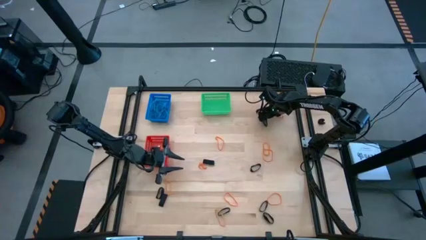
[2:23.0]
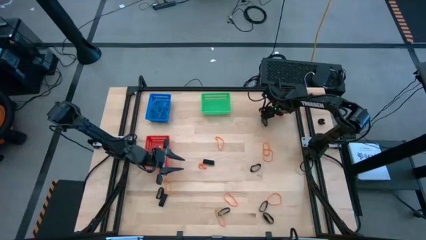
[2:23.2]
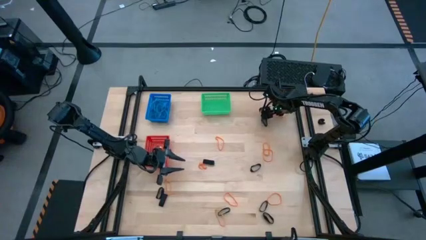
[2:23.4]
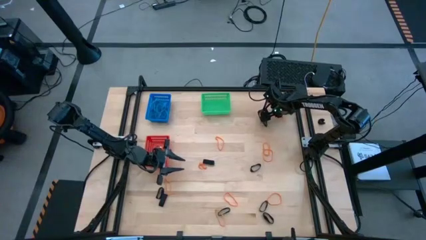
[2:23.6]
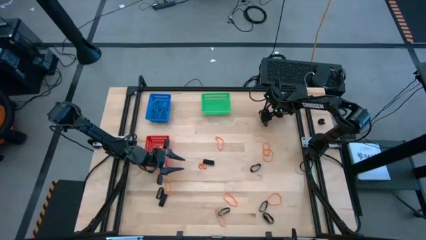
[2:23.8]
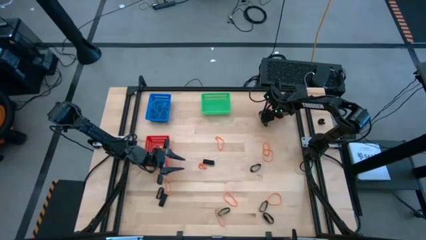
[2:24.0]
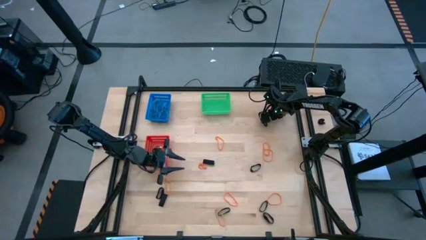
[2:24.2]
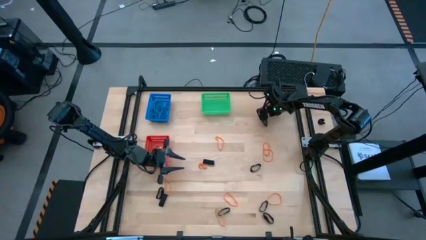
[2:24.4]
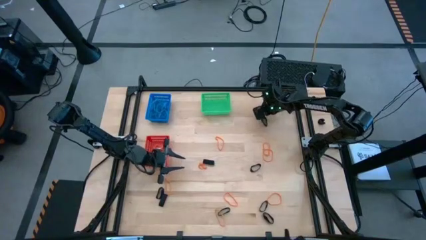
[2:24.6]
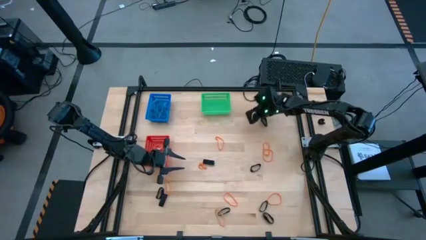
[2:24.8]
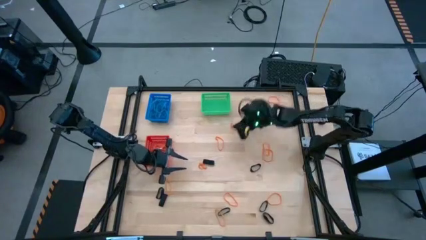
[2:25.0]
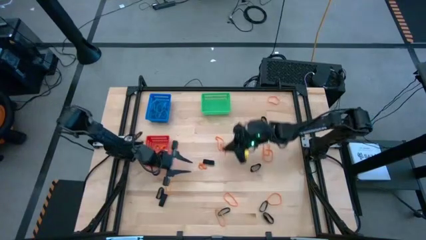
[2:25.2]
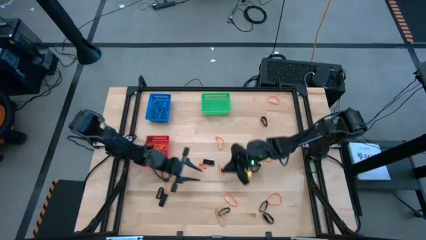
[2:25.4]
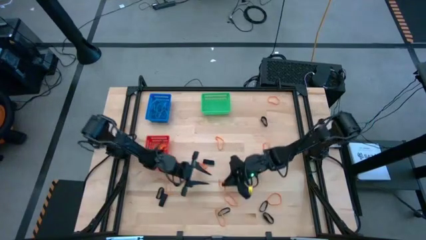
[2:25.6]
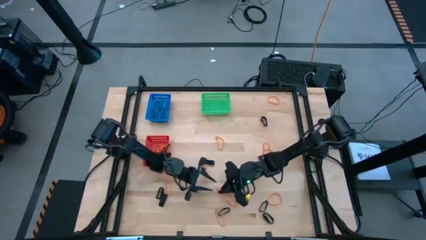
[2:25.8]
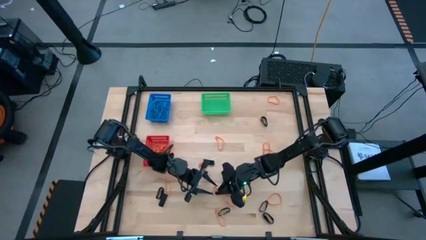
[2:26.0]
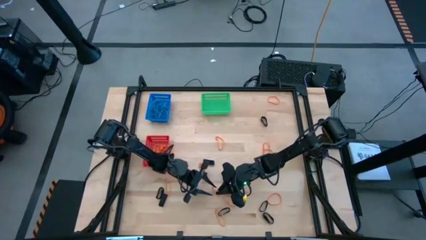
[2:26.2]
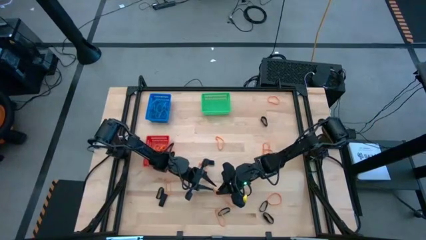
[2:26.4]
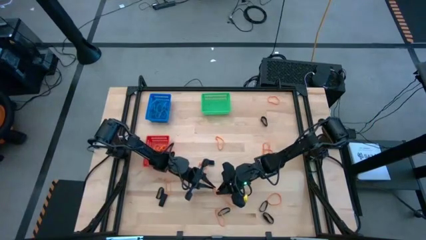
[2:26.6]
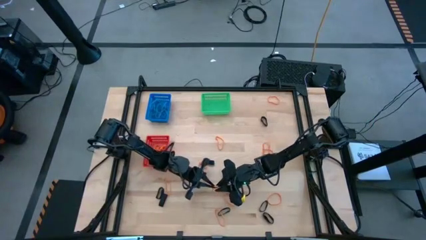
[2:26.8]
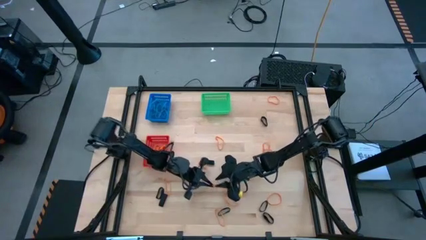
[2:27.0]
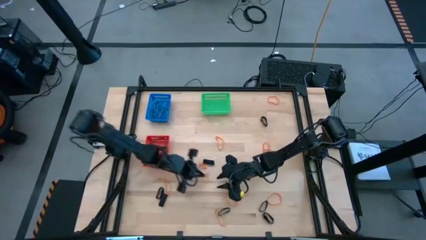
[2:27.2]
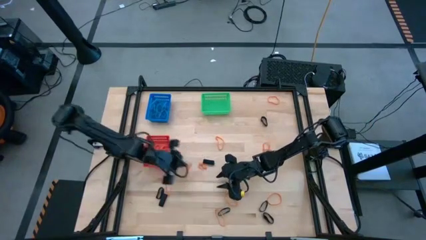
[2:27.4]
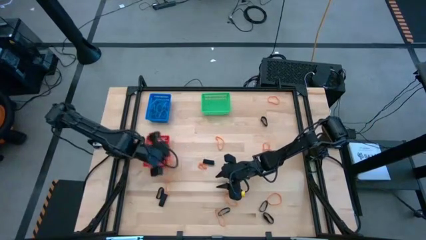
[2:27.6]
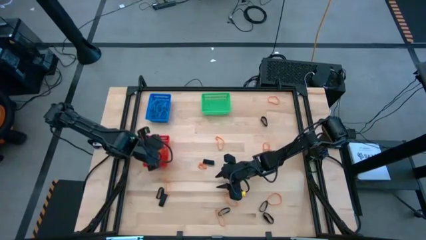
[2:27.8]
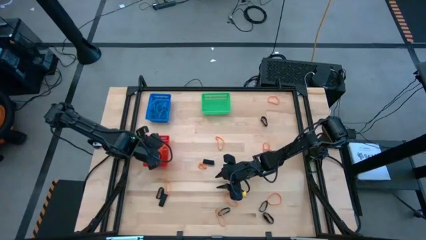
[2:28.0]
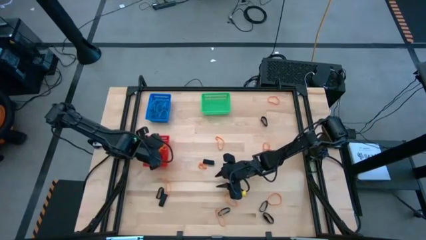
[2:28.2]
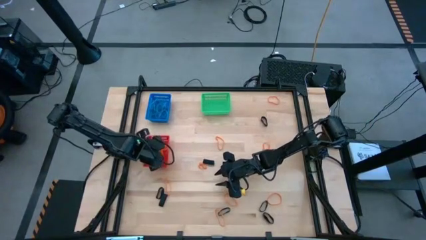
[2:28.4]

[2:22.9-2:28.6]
Task: Sort rubber bands into baskets
Put the orange rubber band into the red bin

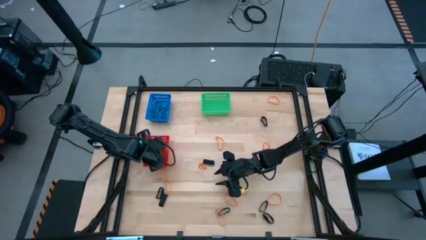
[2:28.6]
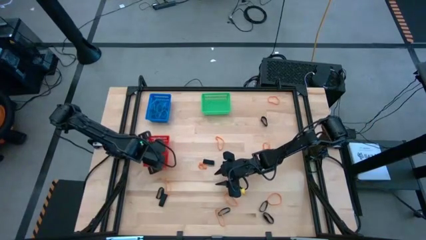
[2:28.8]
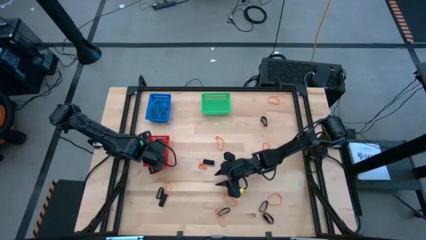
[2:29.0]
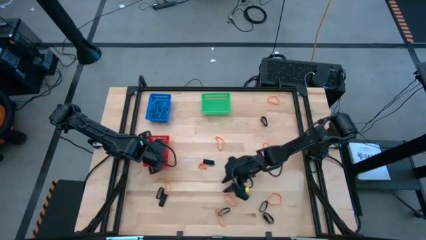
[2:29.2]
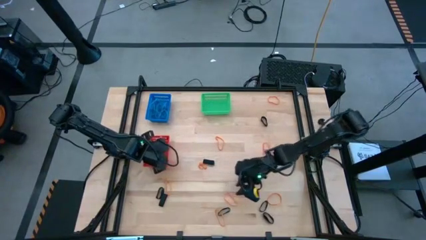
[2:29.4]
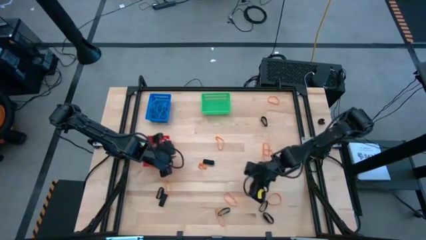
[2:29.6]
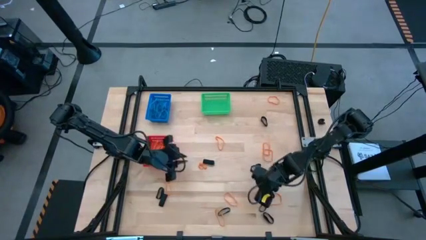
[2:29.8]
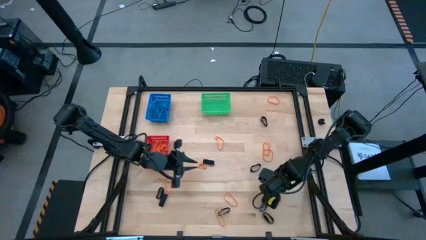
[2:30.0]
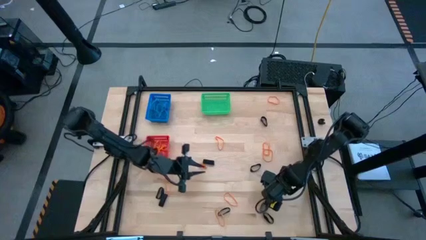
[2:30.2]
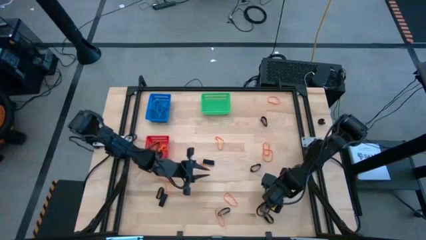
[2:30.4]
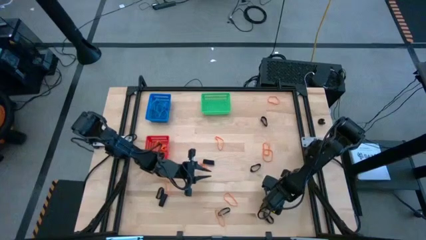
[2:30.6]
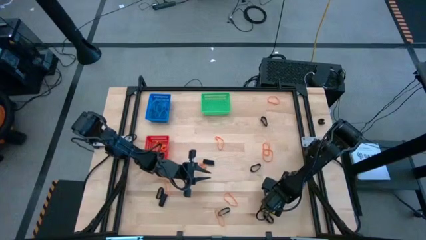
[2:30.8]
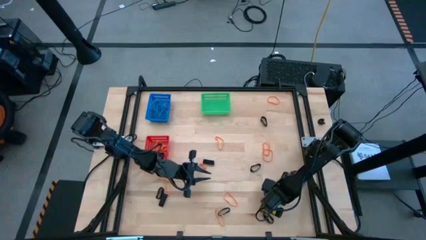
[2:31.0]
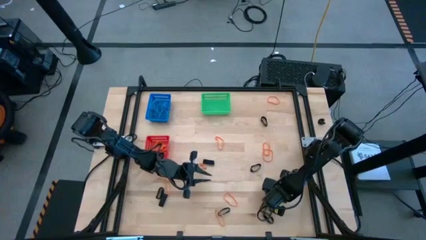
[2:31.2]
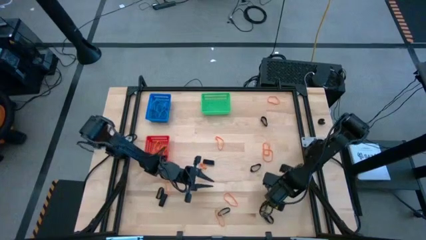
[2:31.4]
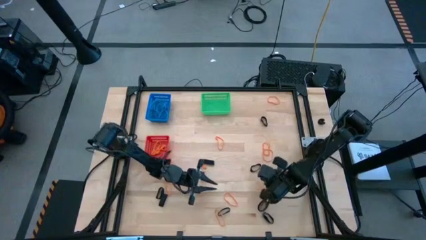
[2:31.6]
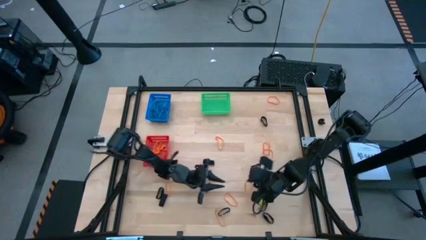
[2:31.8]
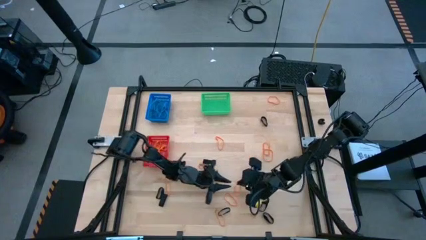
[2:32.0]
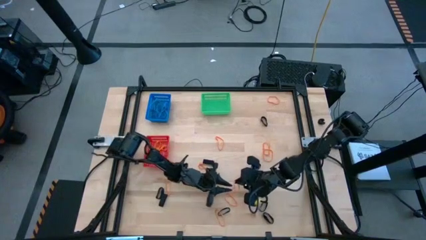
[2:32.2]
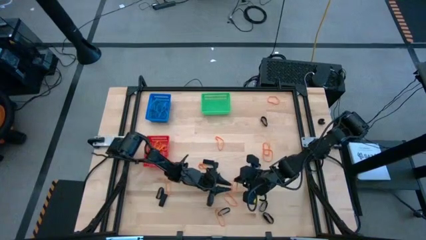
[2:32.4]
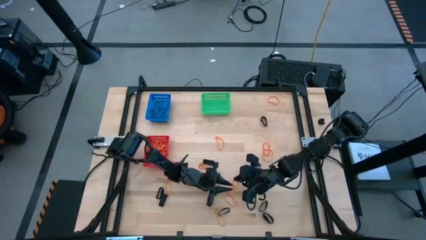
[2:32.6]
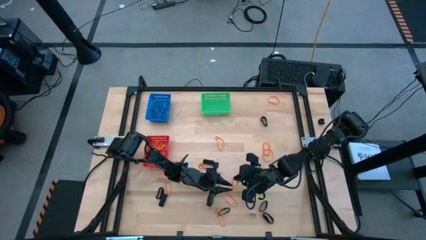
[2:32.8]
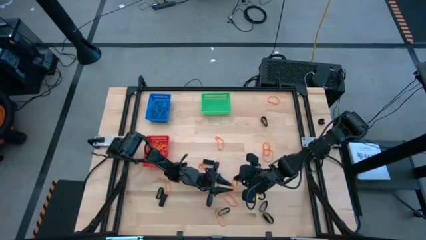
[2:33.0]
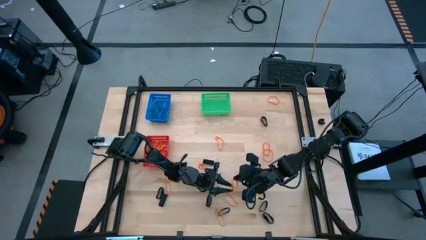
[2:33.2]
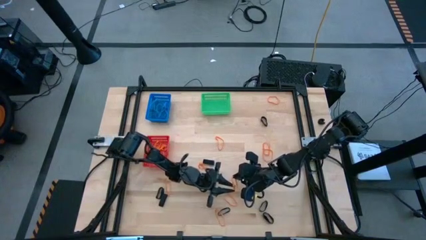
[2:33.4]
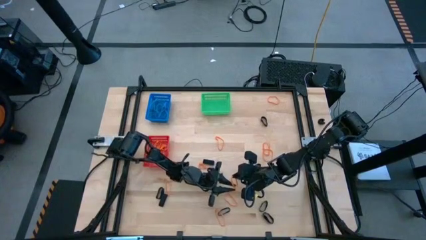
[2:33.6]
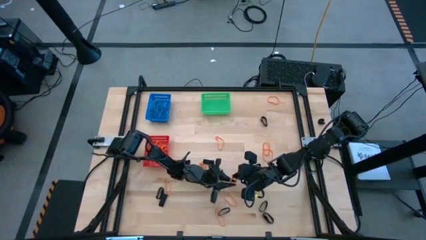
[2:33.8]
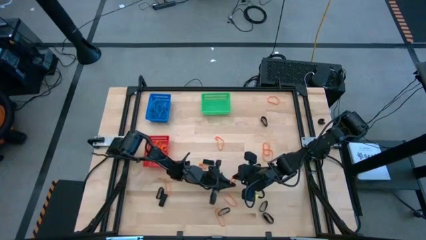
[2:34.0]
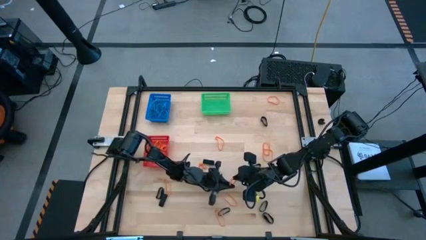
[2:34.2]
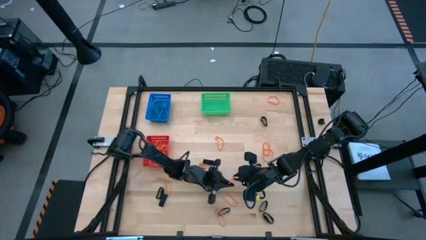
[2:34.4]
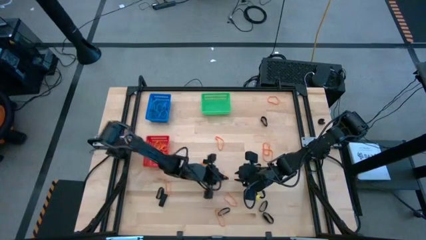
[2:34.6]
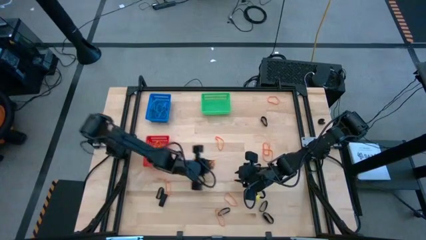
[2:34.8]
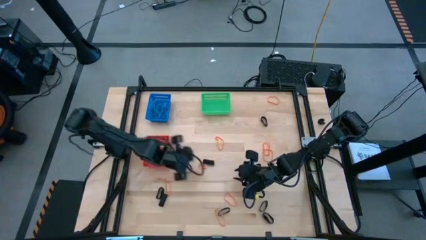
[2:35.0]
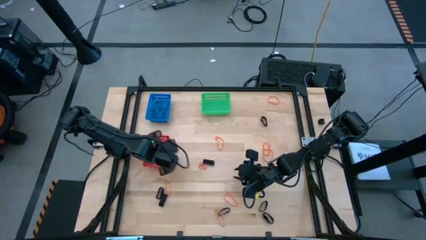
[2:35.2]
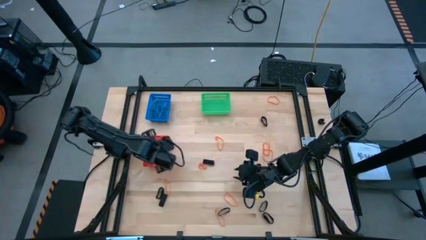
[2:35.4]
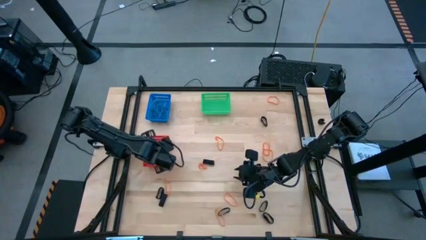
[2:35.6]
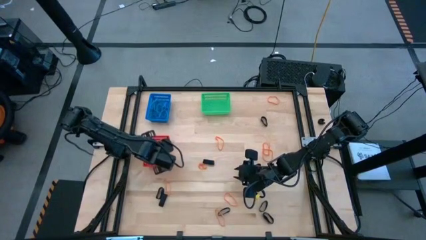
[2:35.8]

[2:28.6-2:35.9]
Put the orange rubber band into the red bin

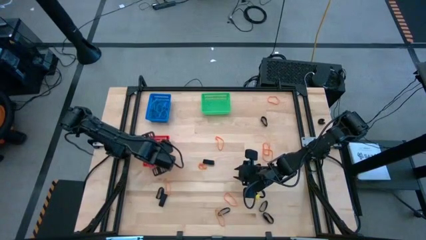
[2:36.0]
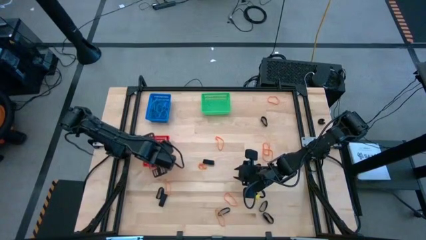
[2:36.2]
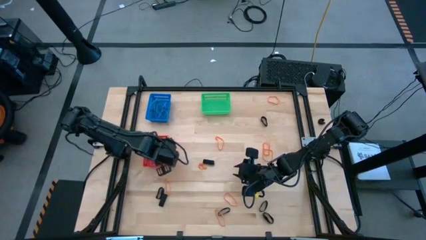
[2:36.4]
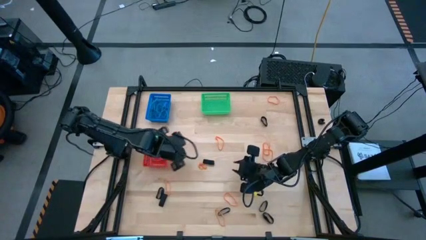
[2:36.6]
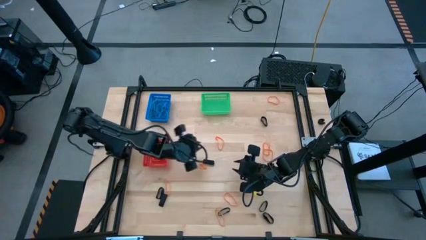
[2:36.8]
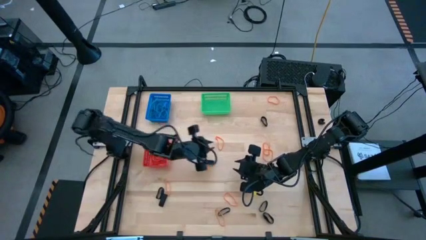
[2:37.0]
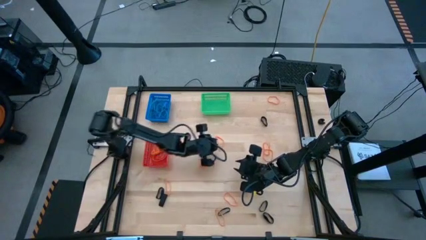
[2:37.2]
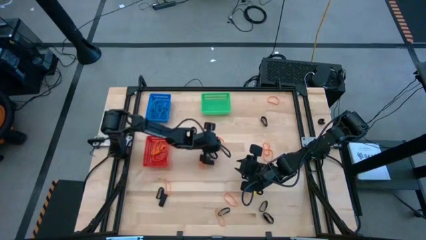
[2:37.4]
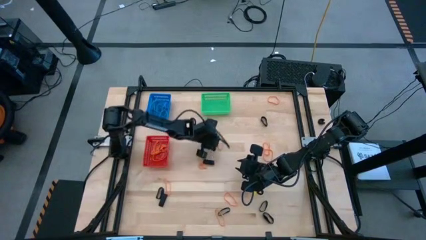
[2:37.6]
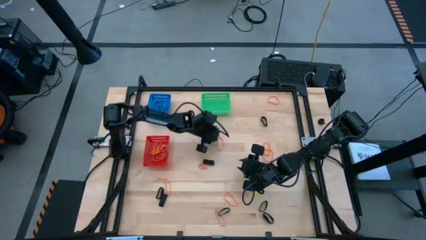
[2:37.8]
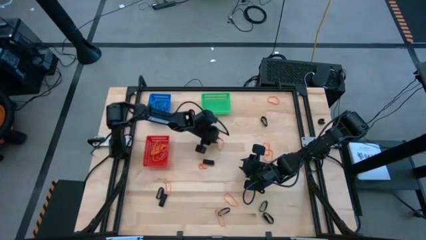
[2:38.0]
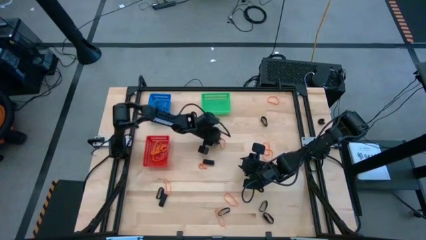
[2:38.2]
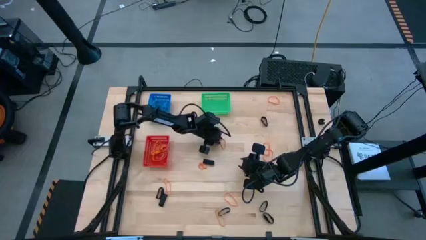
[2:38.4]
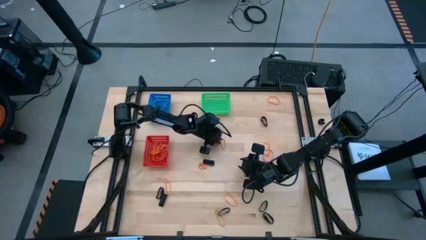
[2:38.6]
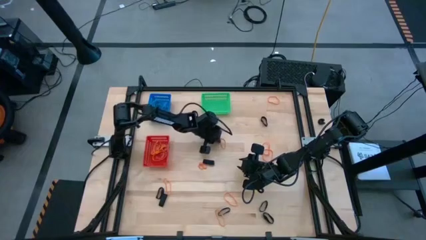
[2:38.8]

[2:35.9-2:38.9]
Put the orange rubber band into the red bin

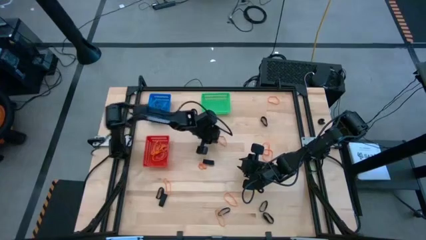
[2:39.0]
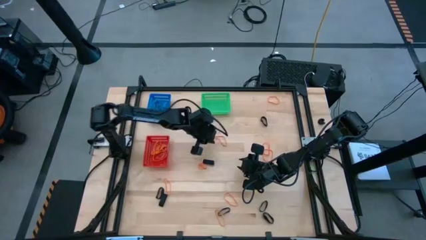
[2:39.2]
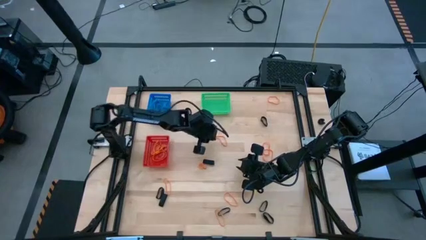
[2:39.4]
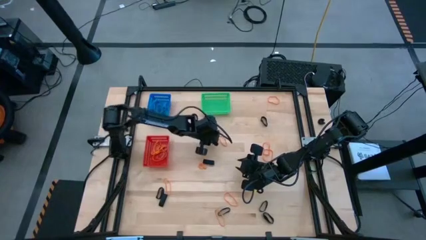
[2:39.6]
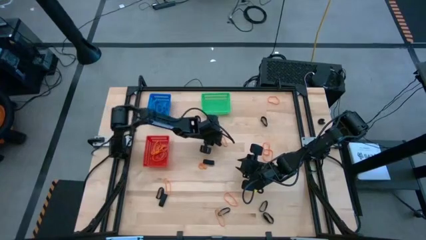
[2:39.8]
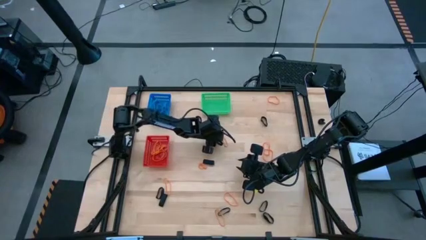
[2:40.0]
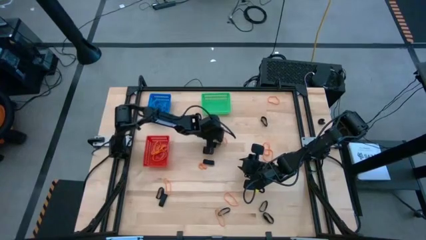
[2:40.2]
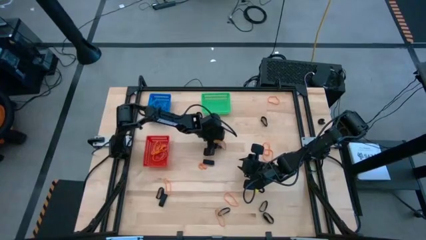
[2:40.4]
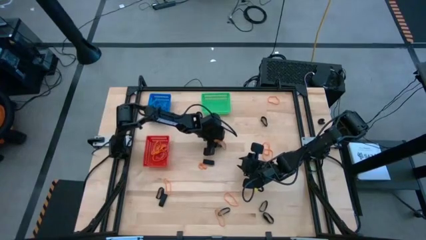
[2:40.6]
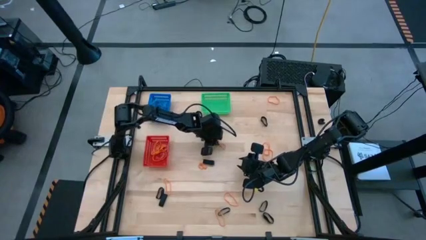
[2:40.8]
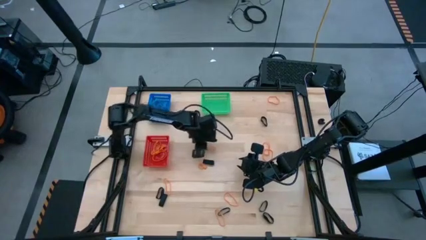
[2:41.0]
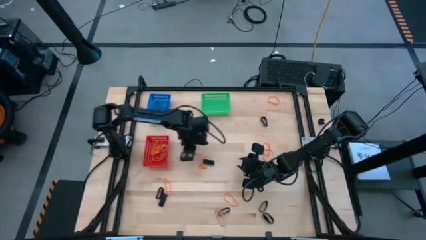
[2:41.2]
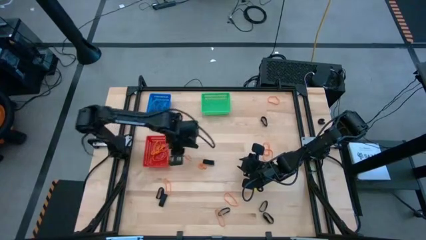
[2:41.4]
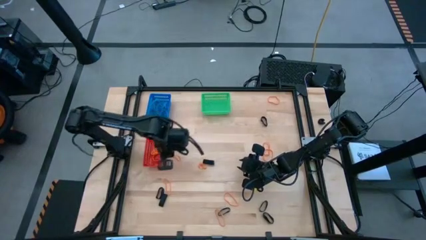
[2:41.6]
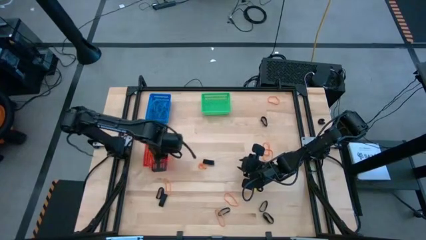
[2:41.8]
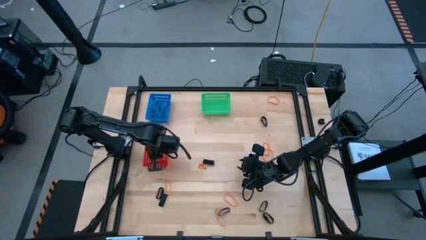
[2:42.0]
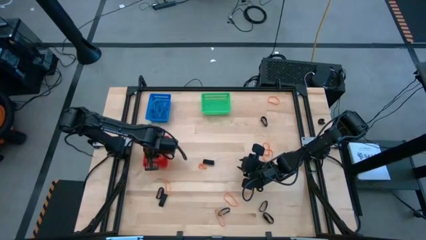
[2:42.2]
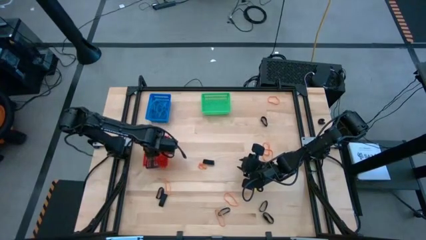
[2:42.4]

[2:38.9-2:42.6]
Put the orange rubber band into the red bin
